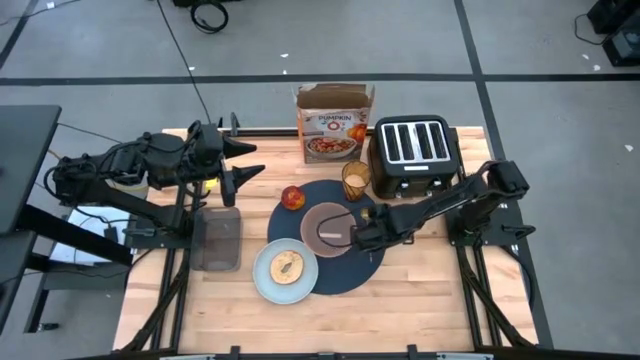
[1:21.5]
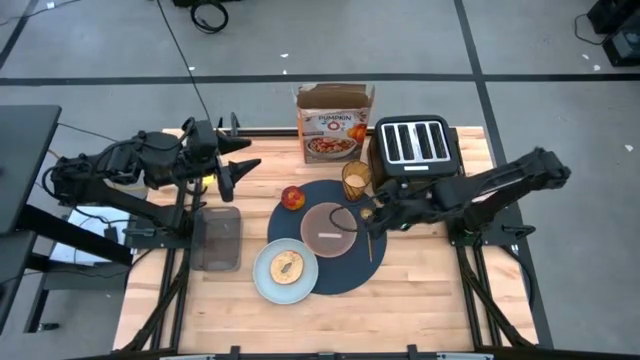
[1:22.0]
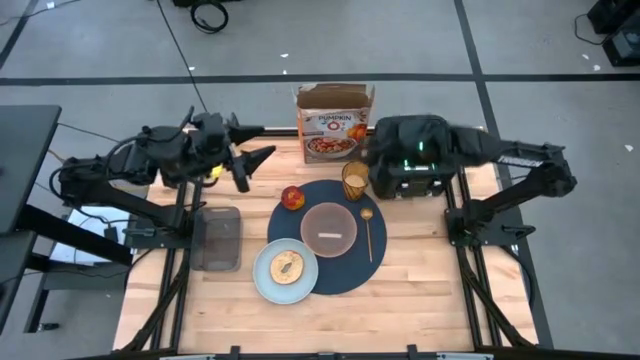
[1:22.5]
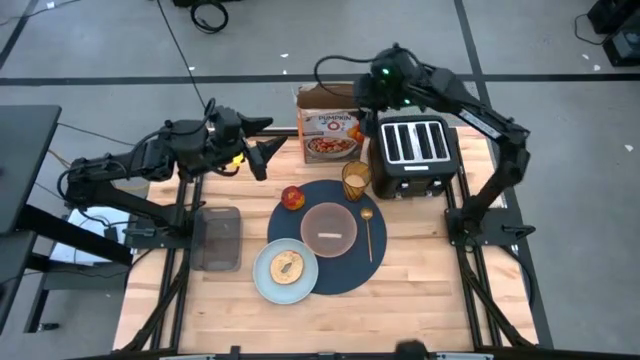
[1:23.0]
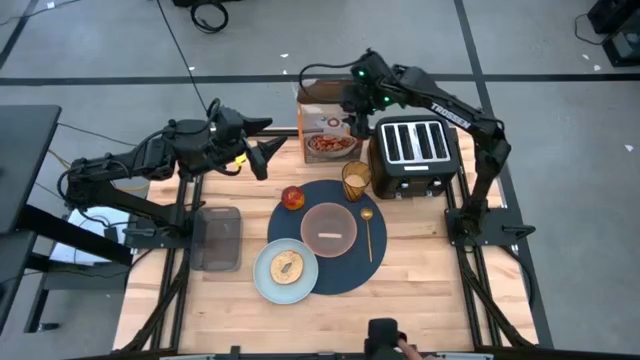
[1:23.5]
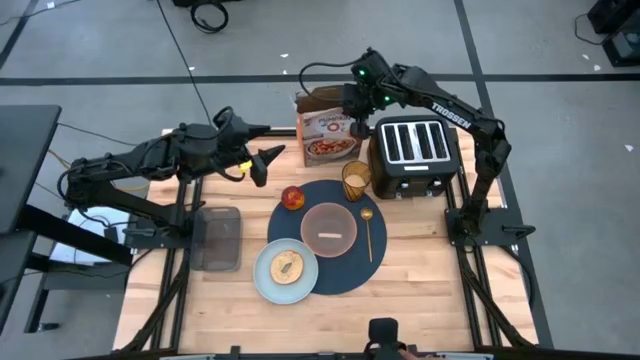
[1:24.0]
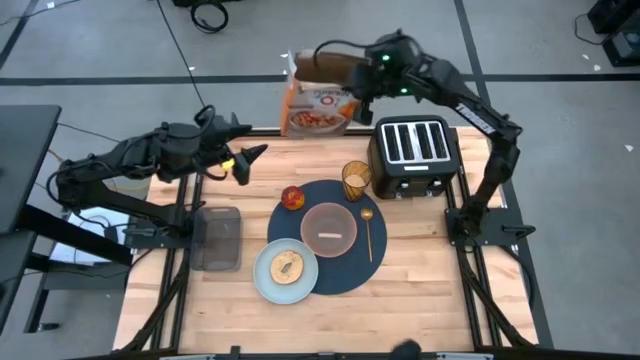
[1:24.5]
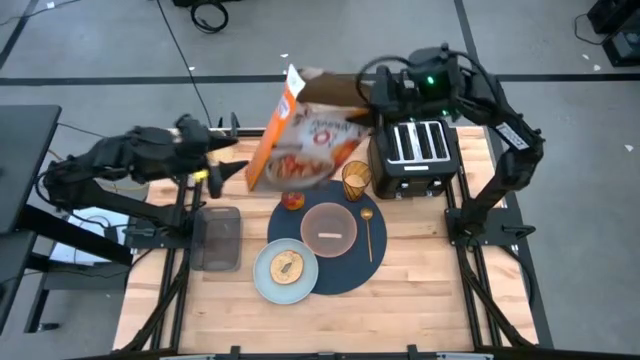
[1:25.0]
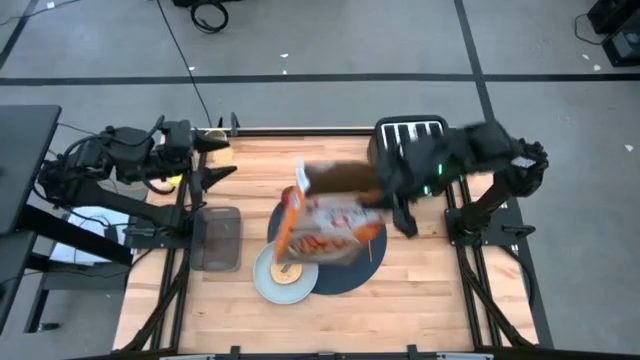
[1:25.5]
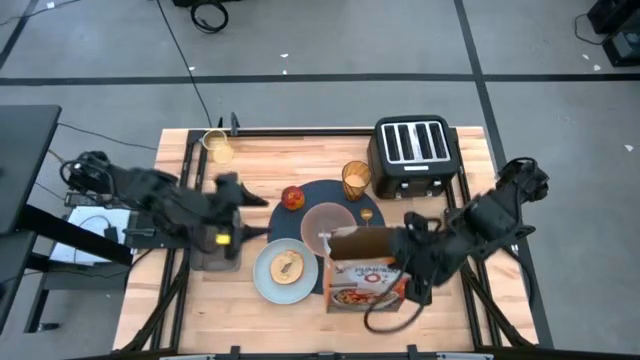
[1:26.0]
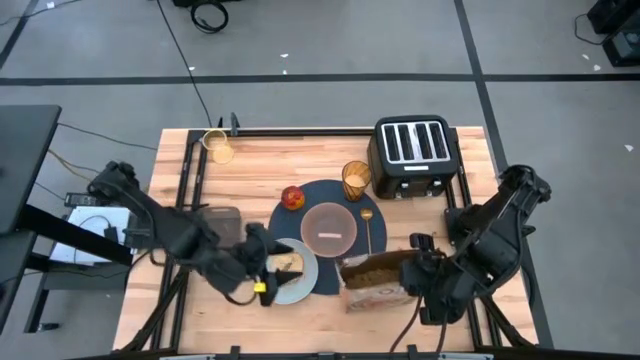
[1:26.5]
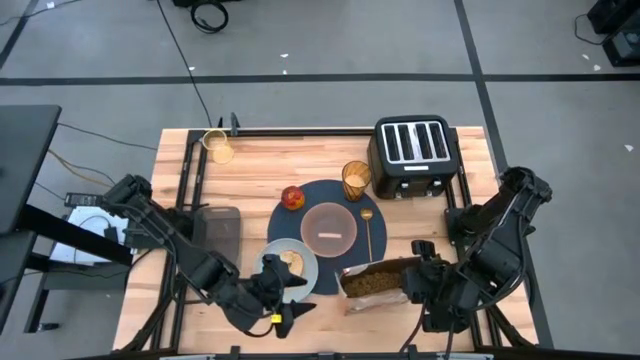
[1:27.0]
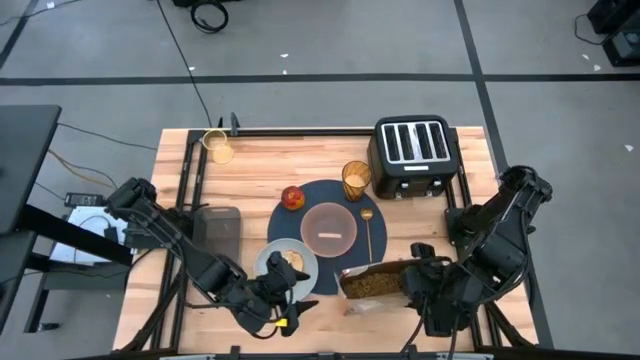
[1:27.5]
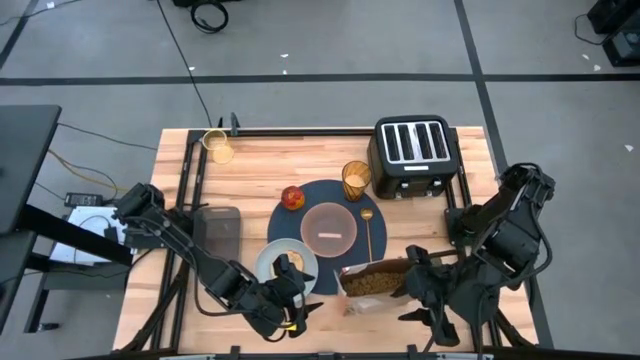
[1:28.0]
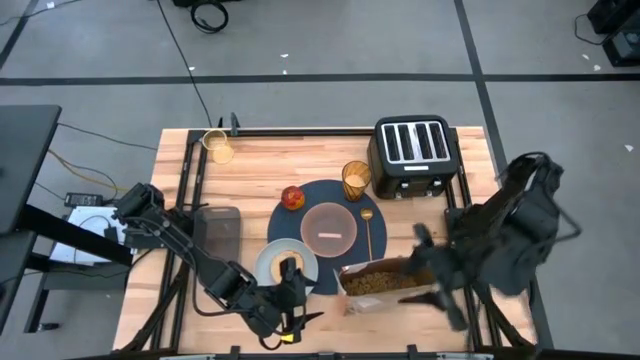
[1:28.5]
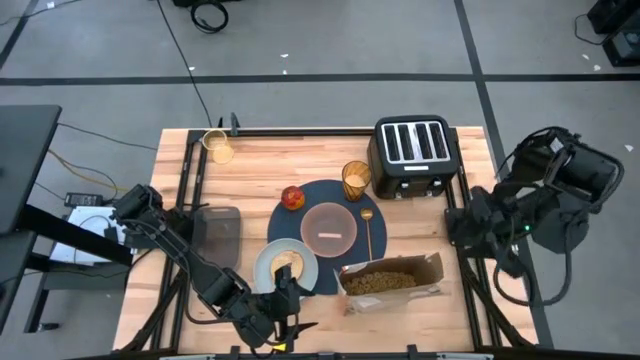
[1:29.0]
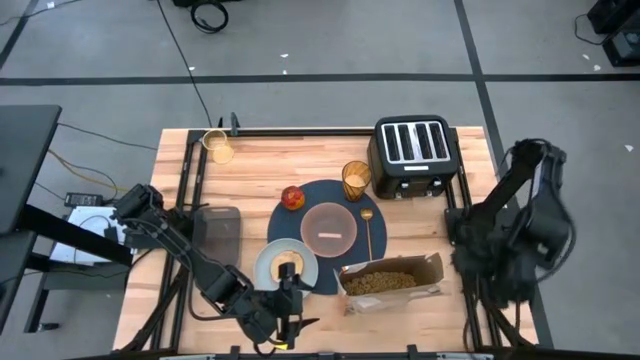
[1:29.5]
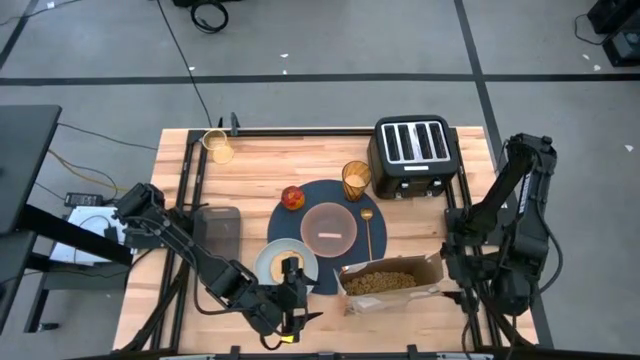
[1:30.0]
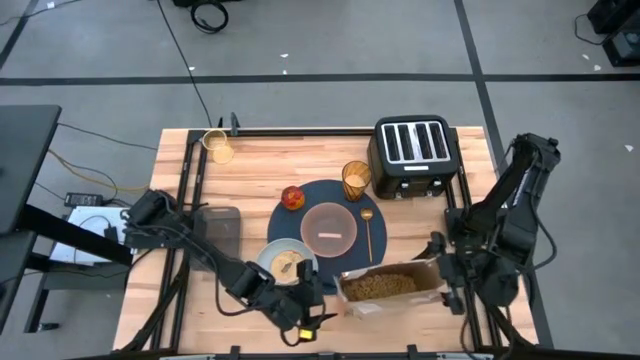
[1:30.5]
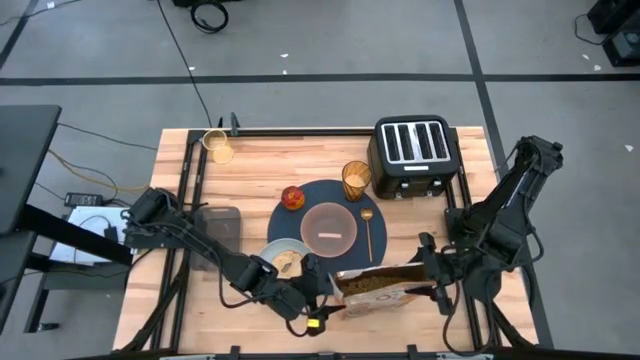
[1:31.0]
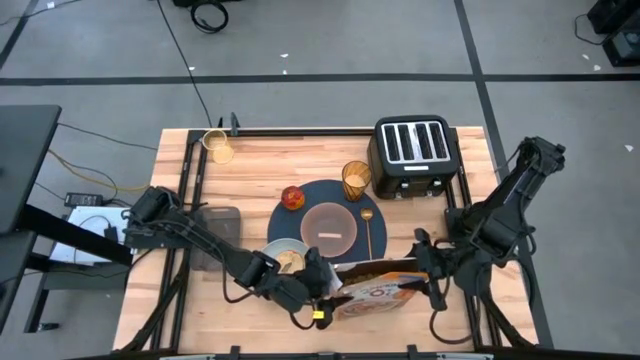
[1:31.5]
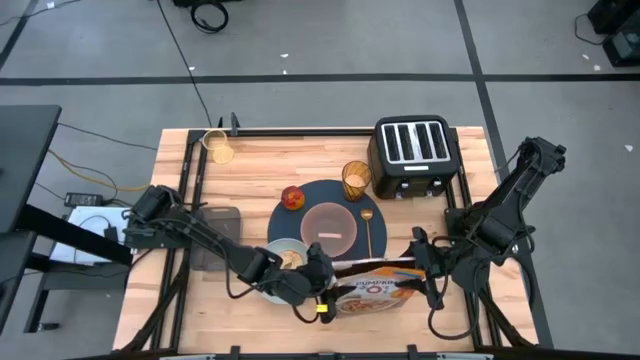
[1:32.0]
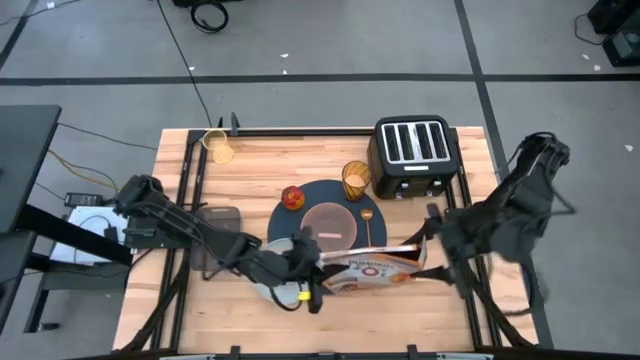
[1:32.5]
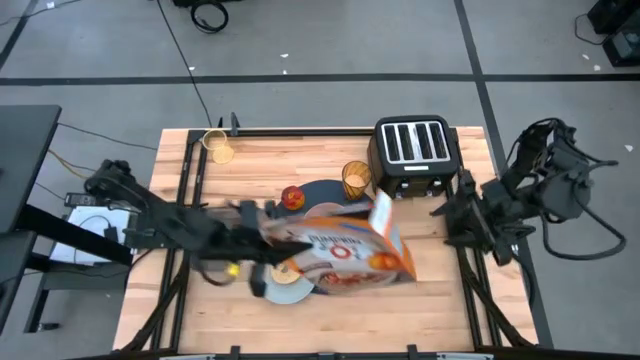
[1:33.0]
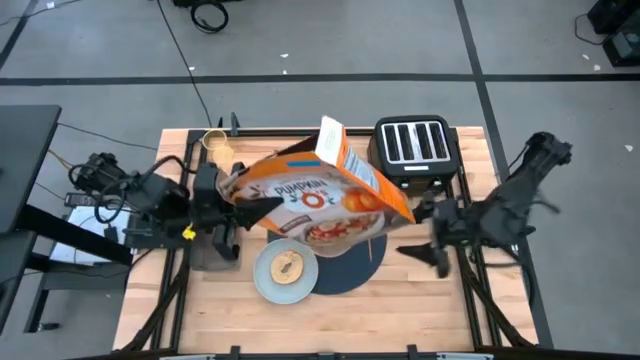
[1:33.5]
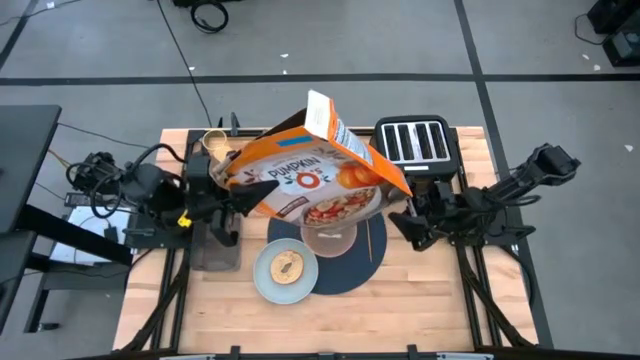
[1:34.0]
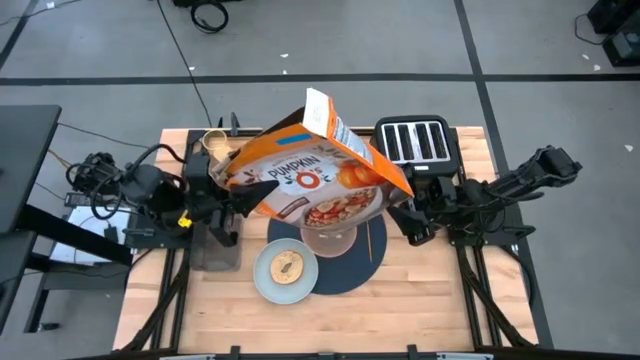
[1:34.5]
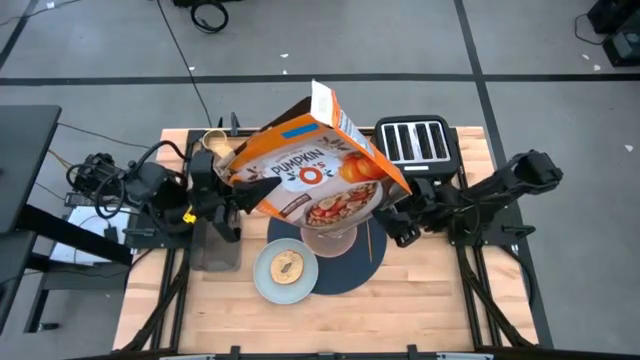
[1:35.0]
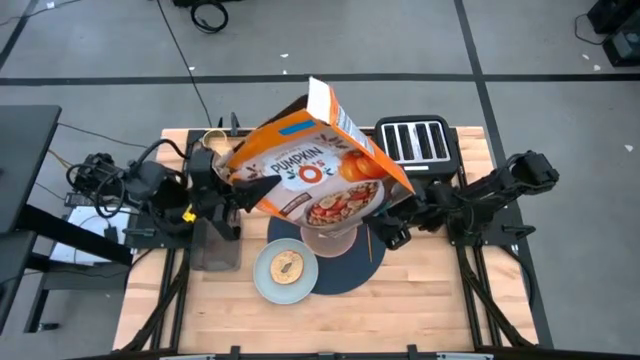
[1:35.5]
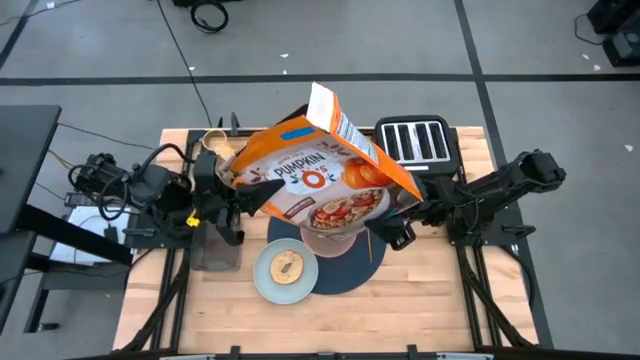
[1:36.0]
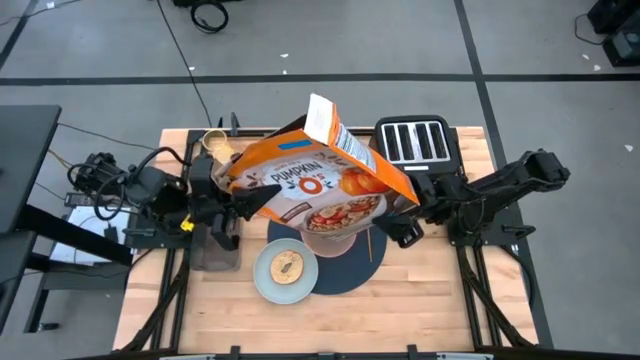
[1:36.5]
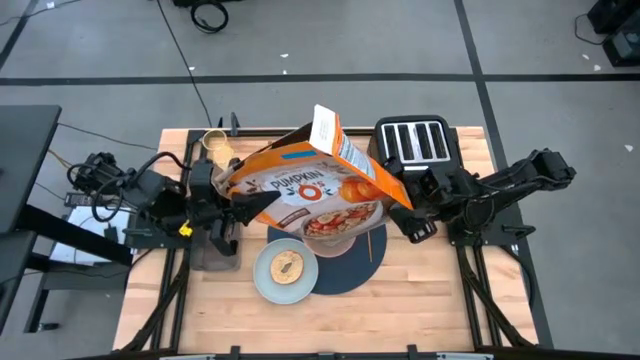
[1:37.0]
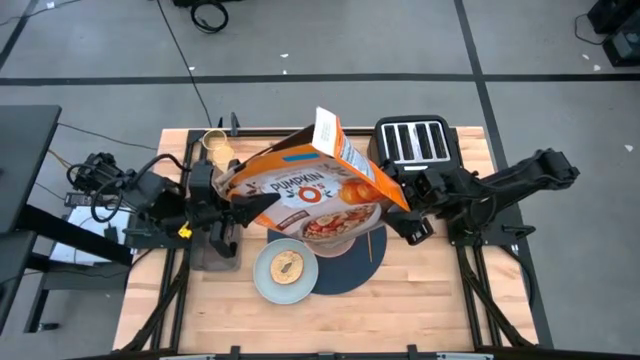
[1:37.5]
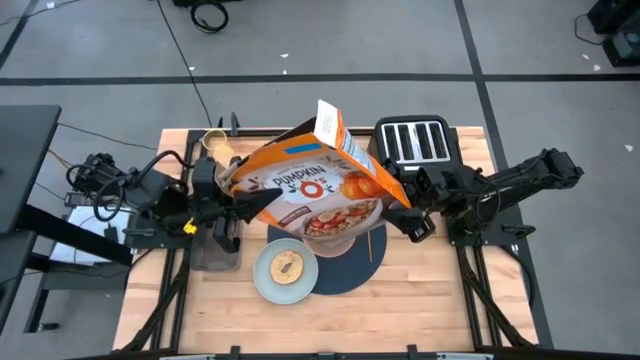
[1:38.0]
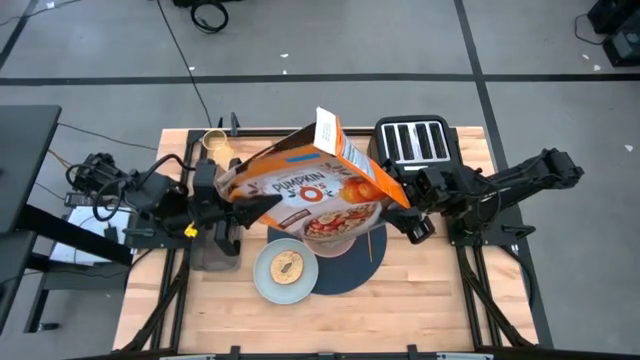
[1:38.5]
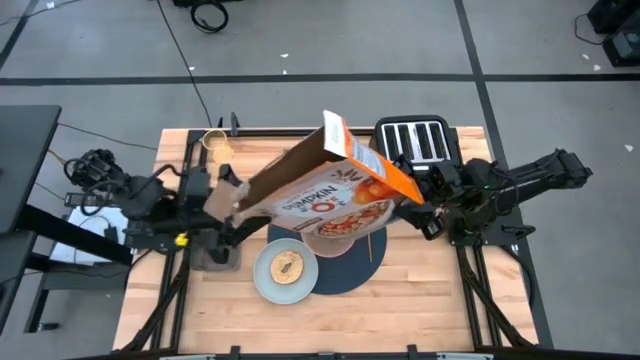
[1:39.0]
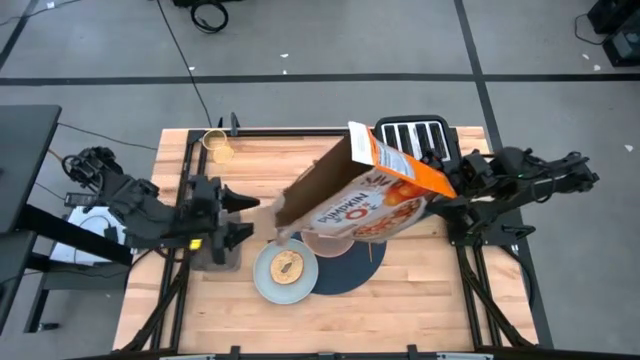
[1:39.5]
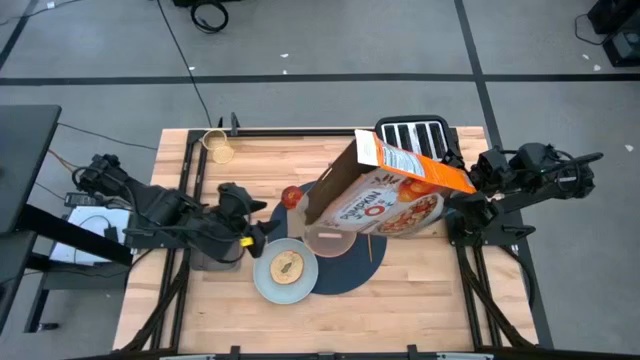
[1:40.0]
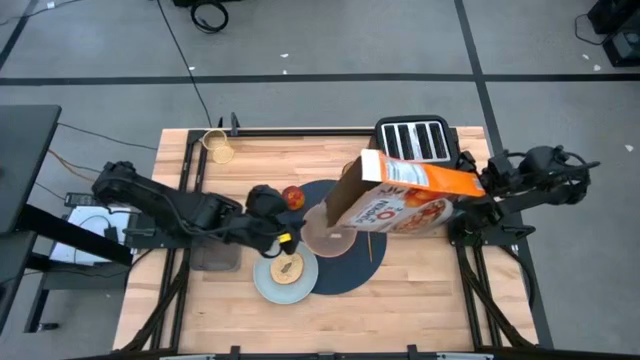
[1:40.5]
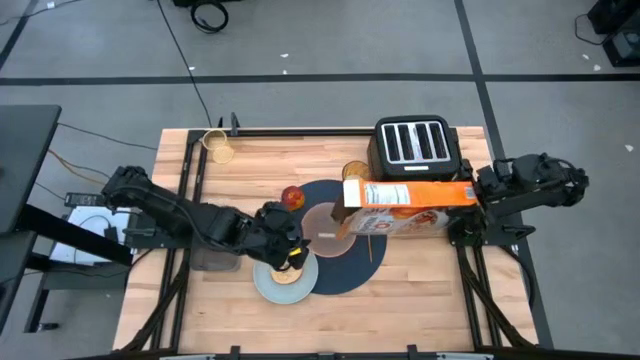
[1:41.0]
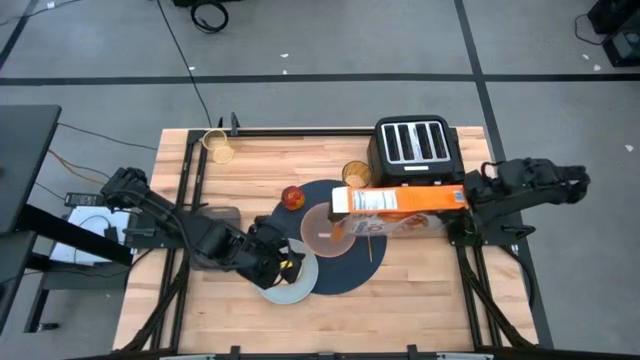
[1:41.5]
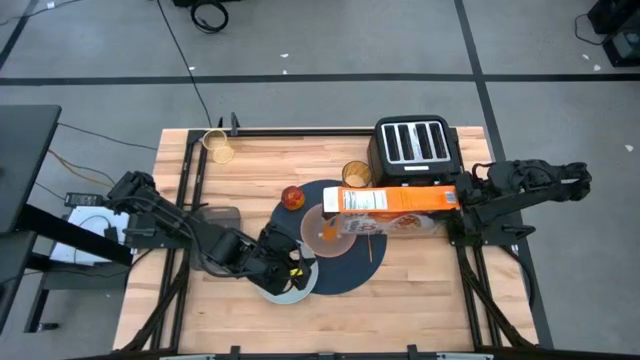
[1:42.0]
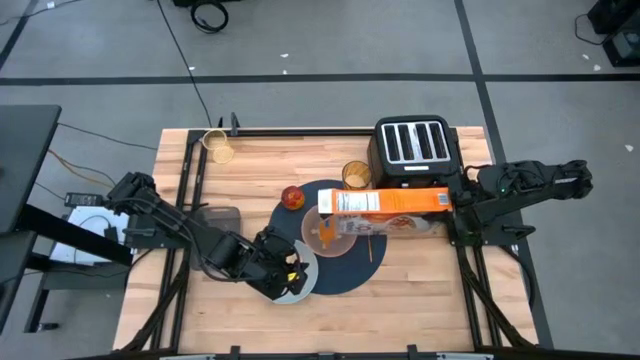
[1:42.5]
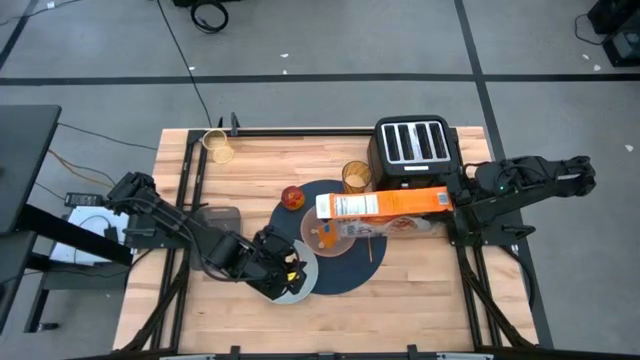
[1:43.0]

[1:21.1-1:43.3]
Task: Arrange a breakfast setting
Pour the cereal from the cereal box into the orange bowl
